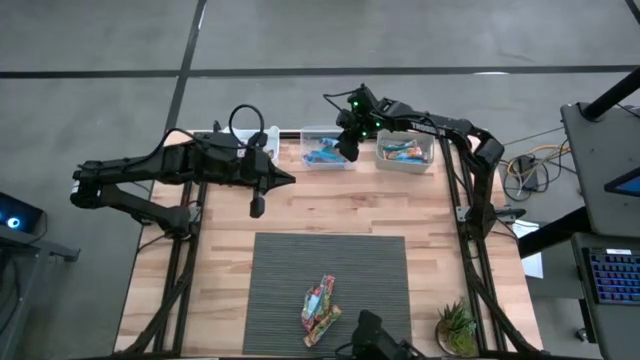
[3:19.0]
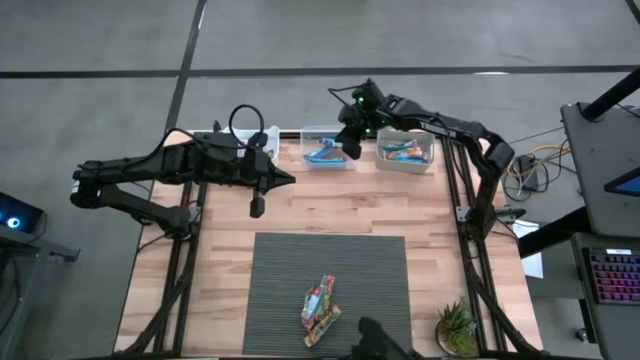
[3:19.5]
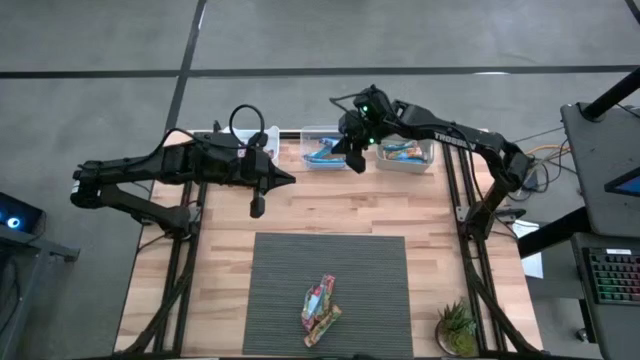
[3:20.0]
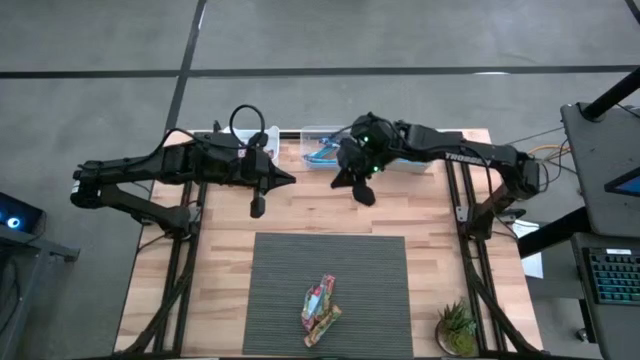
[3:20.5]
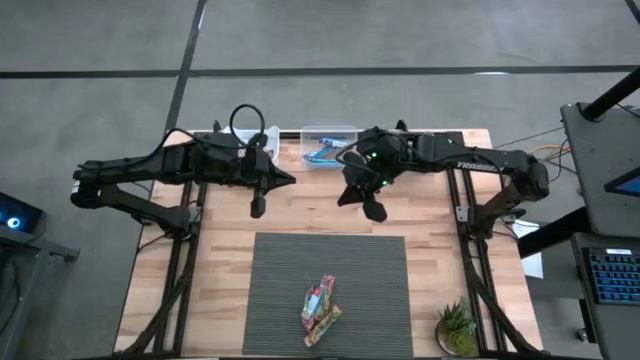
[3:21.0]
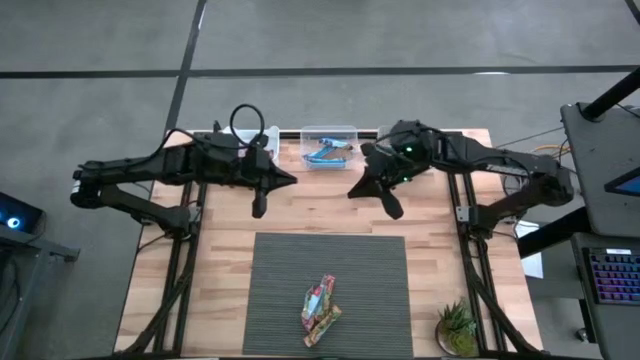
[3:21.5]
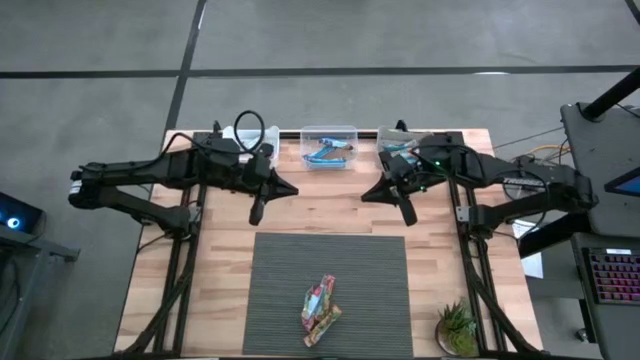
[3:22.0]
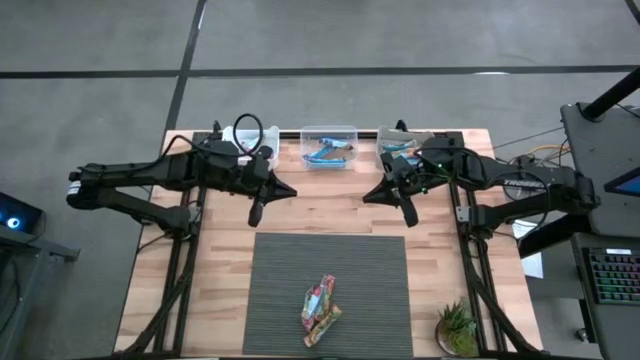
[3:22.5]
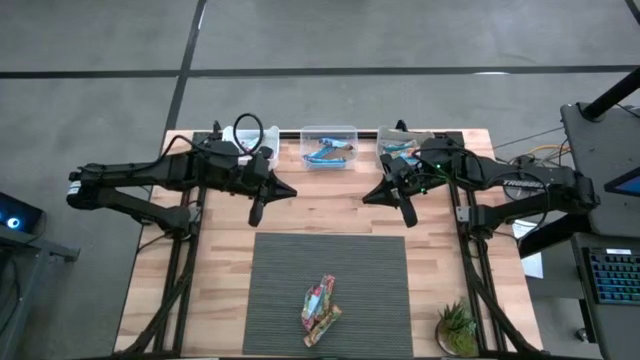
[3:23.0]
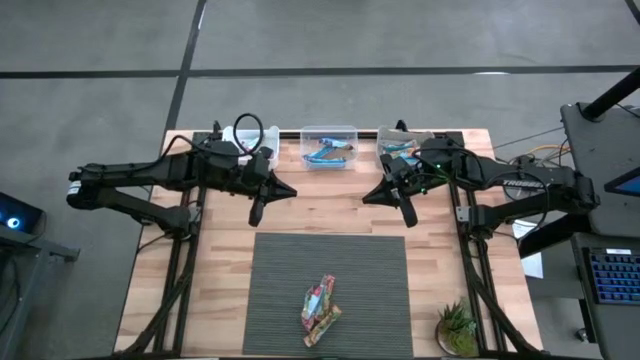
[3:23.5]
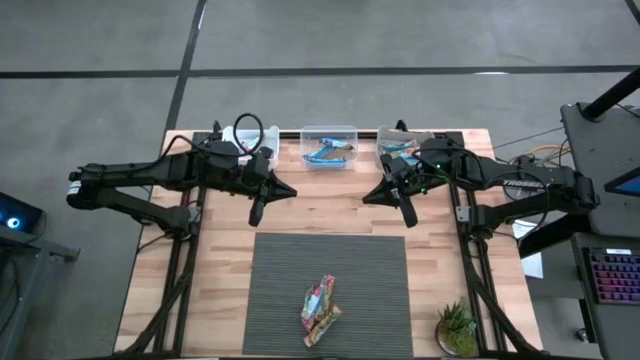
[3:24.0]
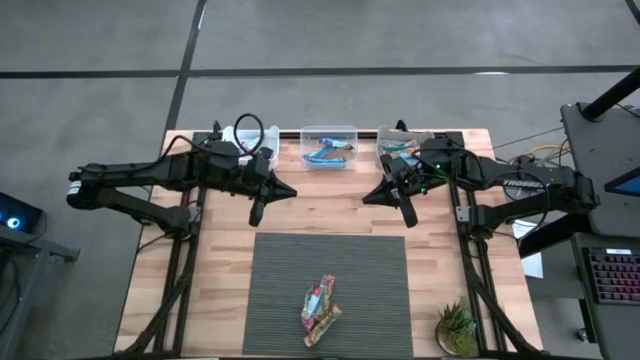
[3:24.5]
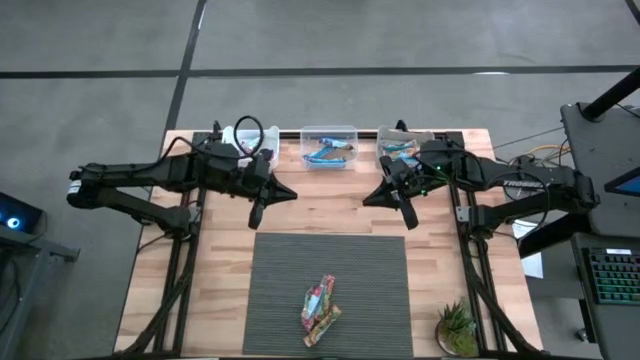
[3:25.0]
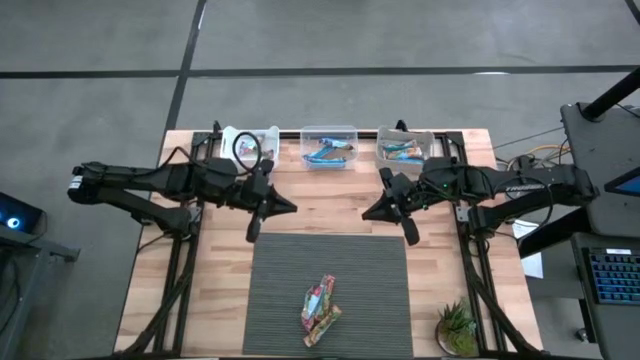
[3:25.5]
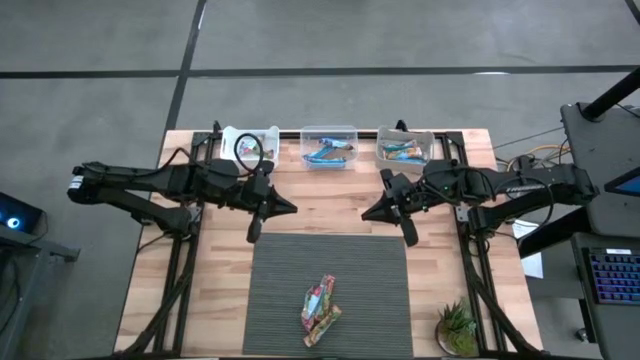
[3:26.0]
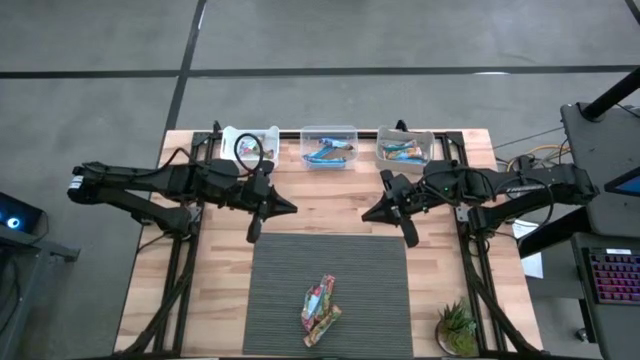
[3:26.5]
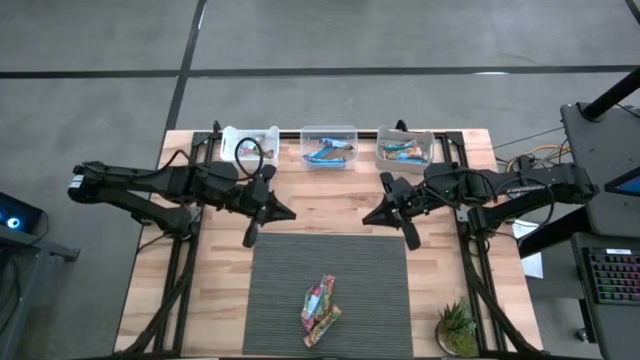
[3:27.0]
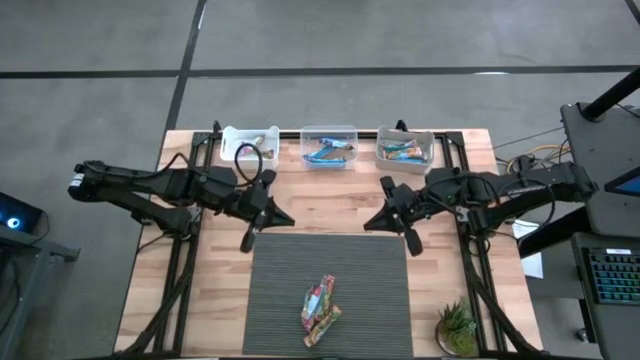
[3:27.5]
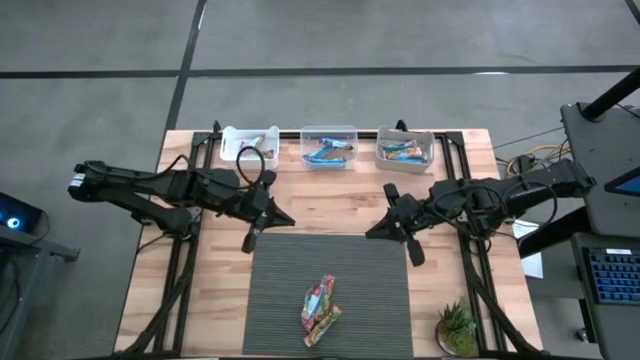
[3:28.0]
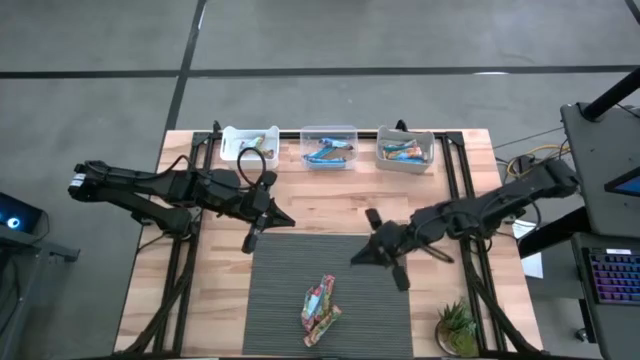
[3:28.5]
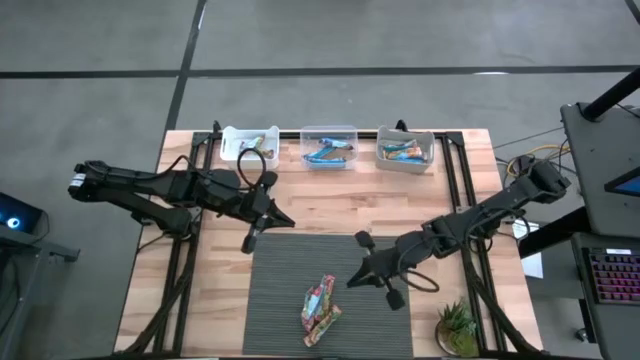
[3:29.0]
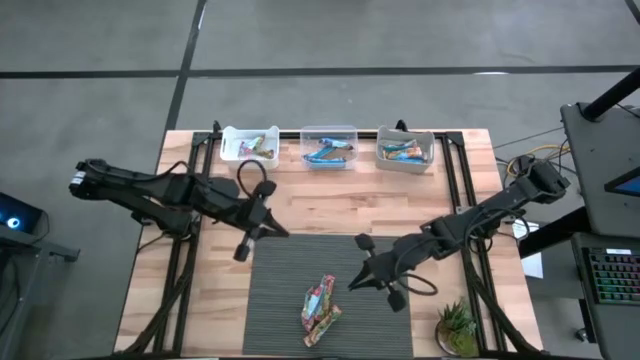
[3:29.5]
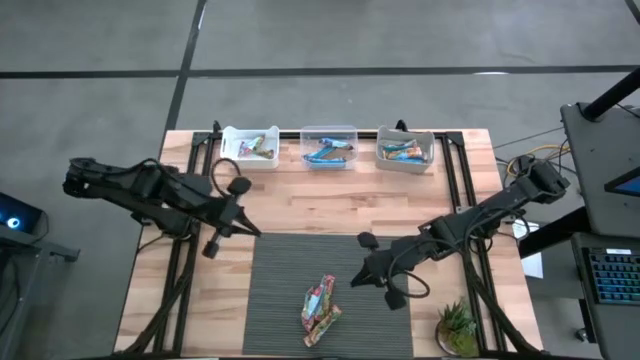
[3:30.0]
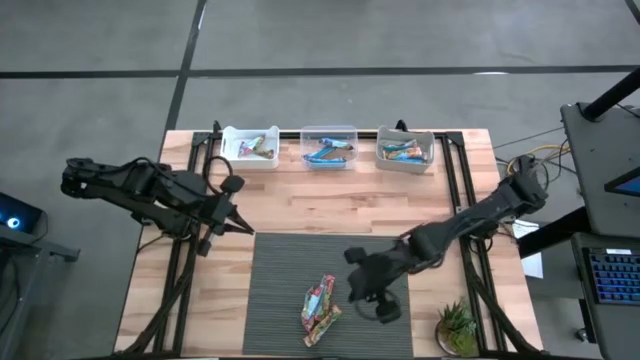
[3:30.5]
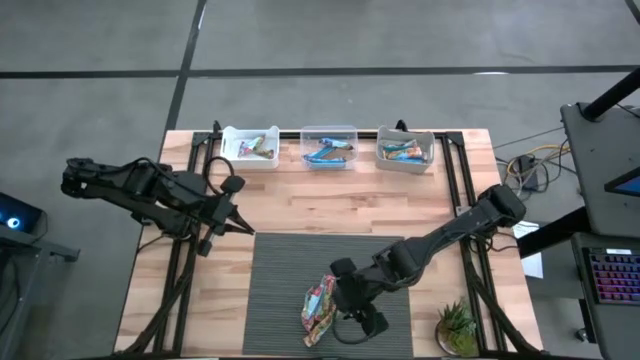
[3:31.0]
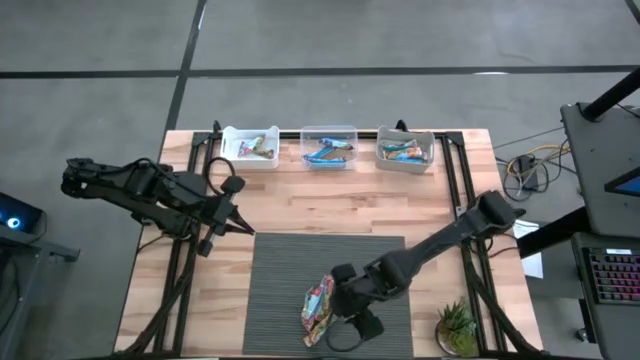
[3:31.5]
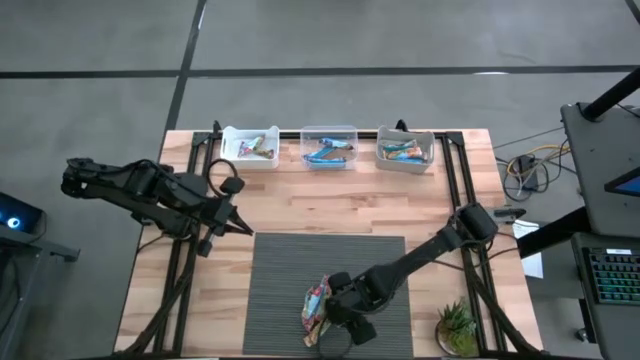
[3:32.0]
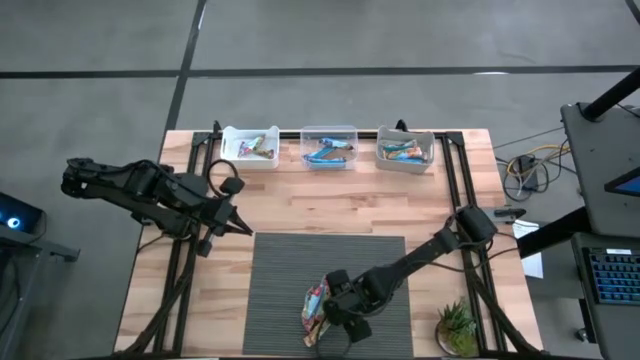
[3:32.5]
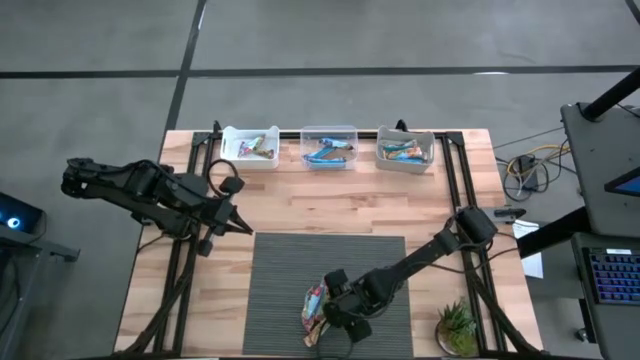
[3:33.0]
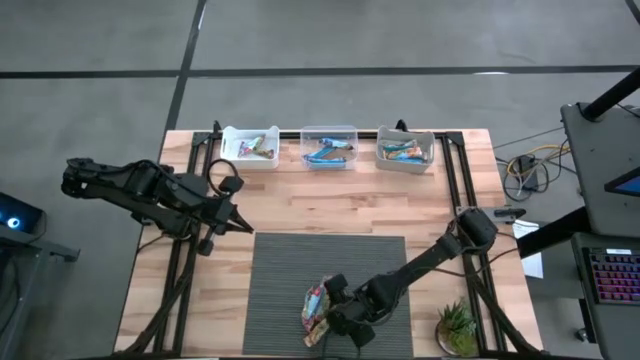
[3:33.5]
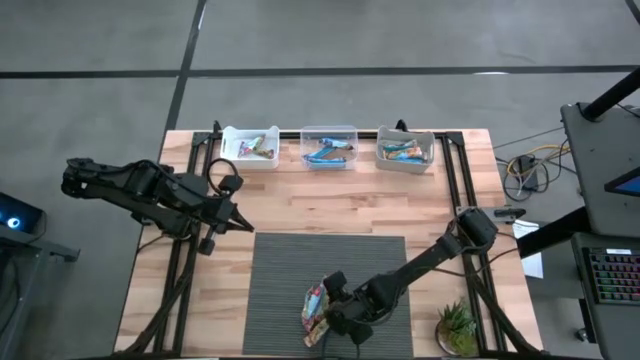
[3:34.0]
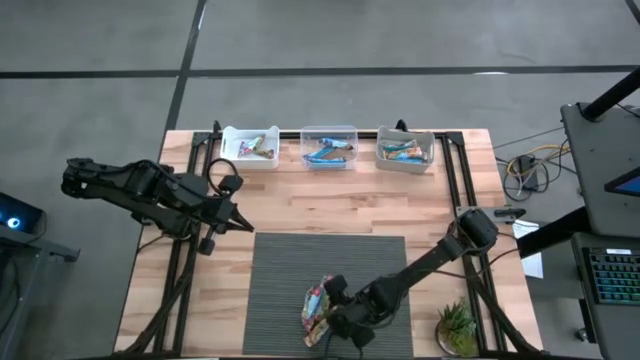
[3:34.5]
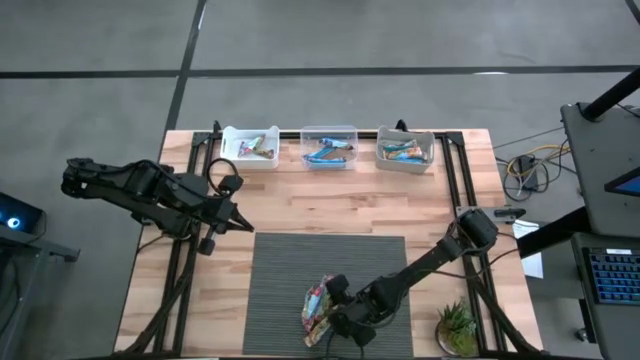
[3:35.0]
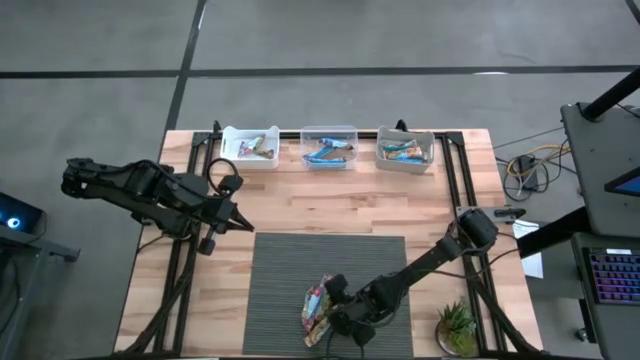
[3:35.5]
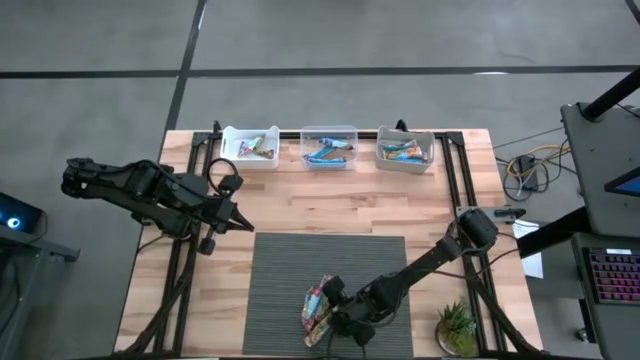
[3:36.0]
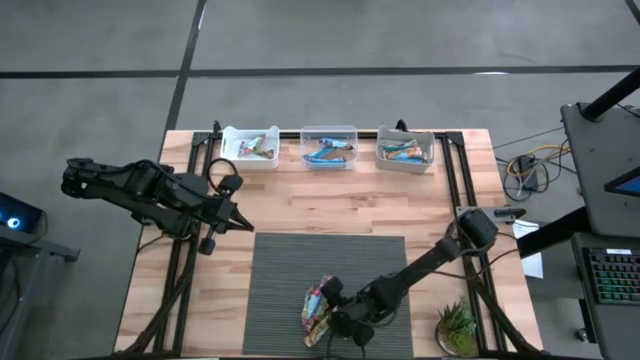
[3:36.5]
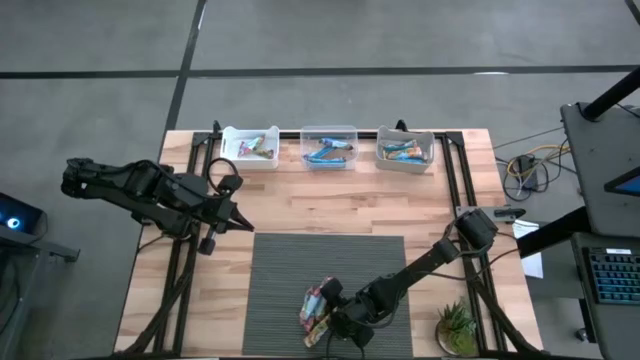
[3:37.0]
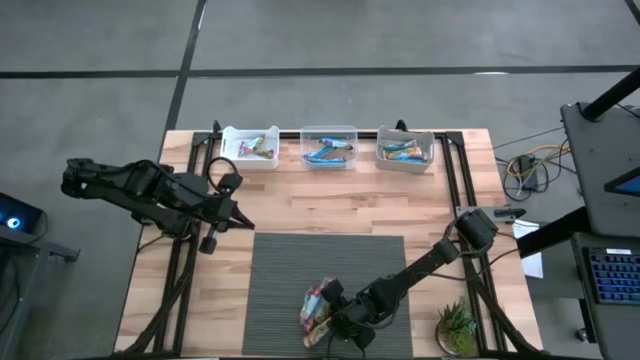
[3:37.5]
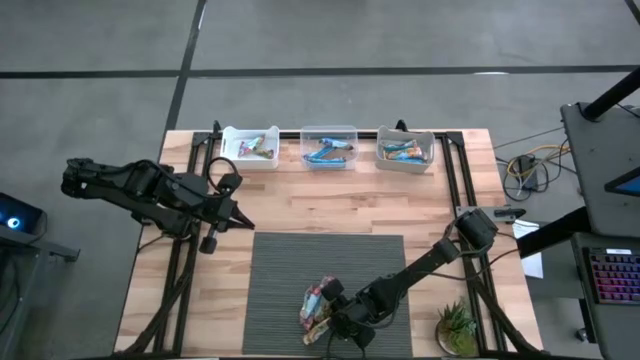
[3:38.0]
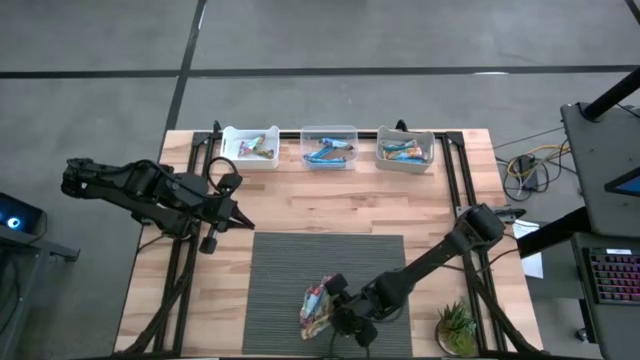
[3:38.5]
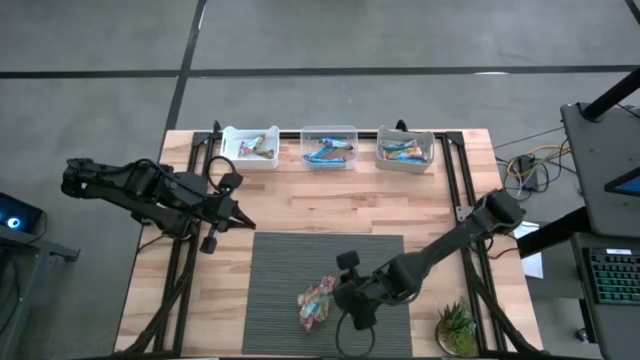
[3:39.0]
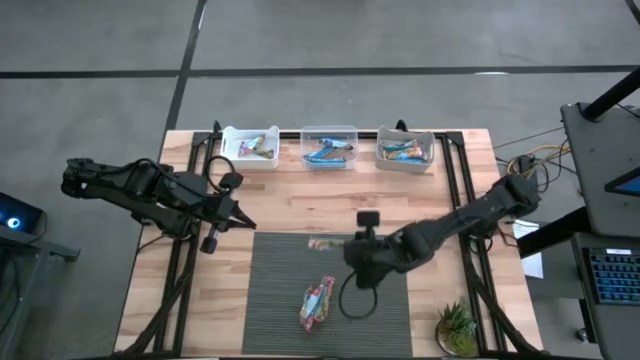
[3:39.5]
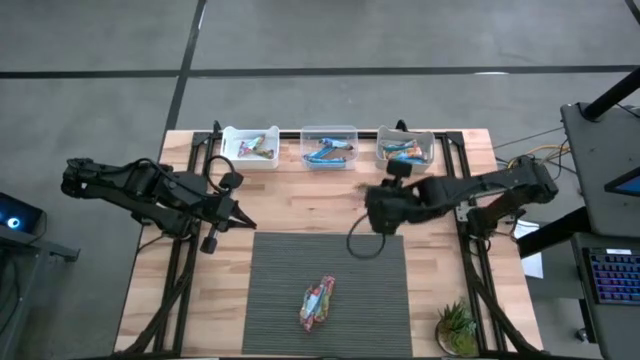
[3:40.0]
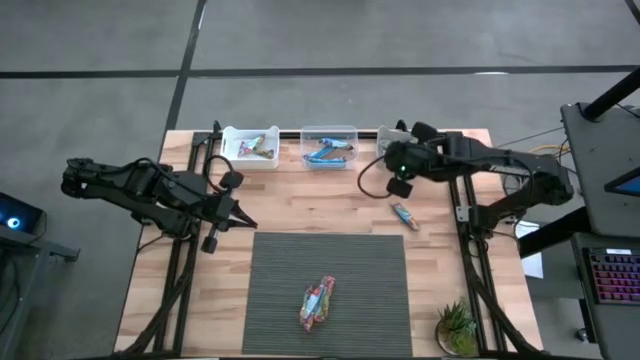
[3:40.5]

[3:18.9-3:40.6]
Task: Pick and place Granola Bars by type
Put the yellow granola bar into the gray bin

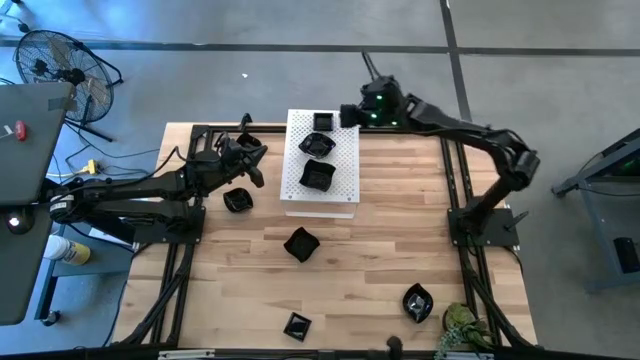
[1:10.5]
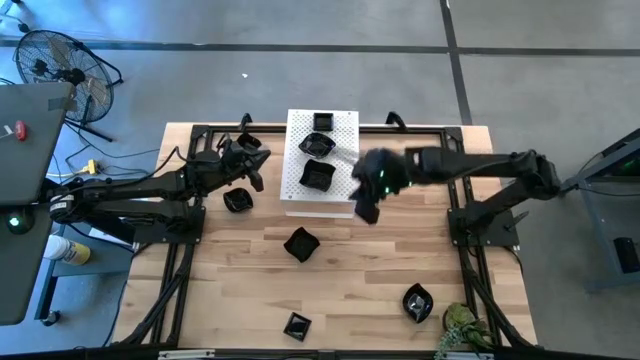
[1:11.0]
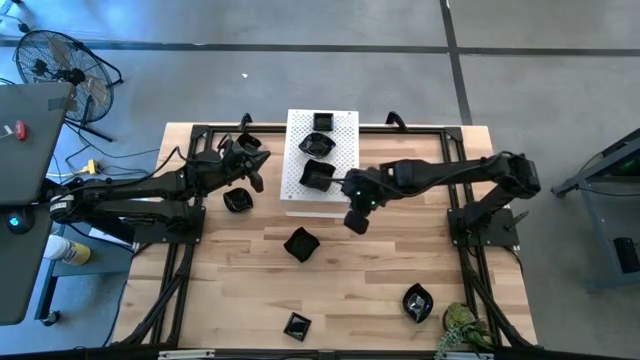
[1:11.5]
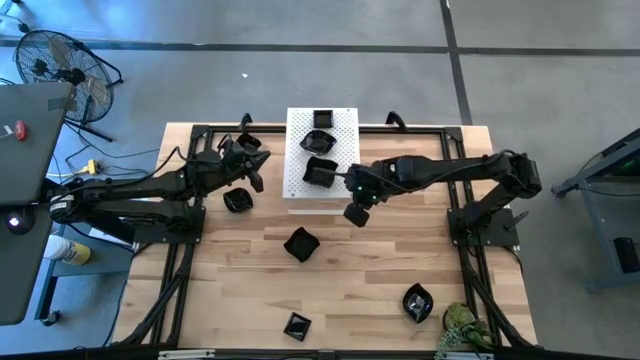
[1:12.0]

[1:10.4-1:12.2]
Task: Pick & Place Mini shaped plates
Adjust the shelf
